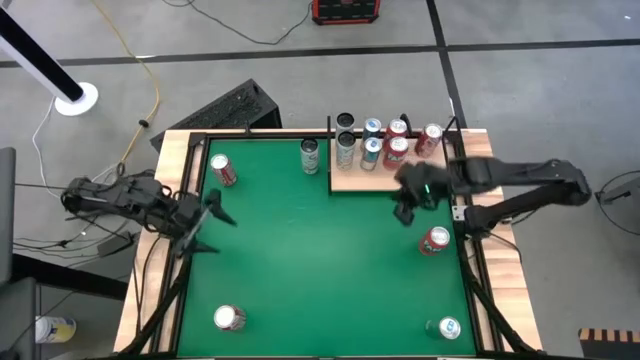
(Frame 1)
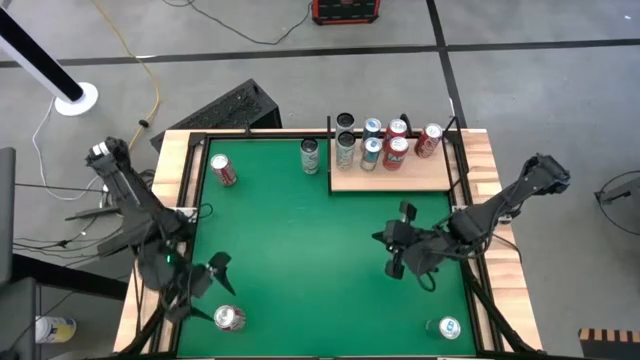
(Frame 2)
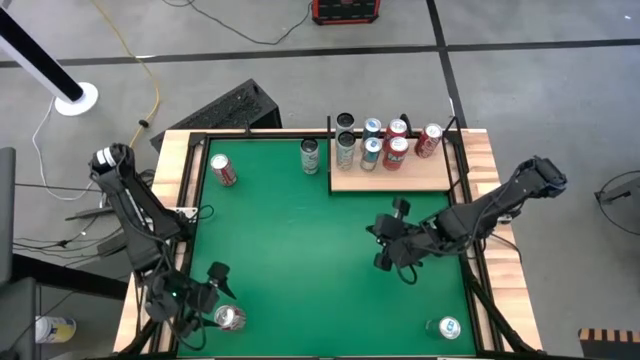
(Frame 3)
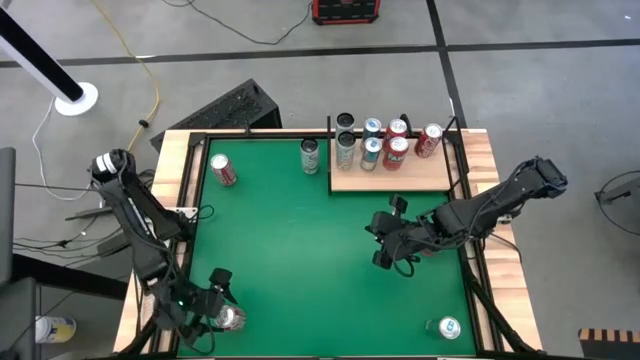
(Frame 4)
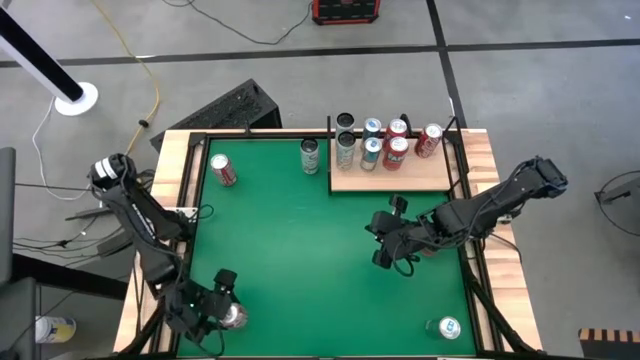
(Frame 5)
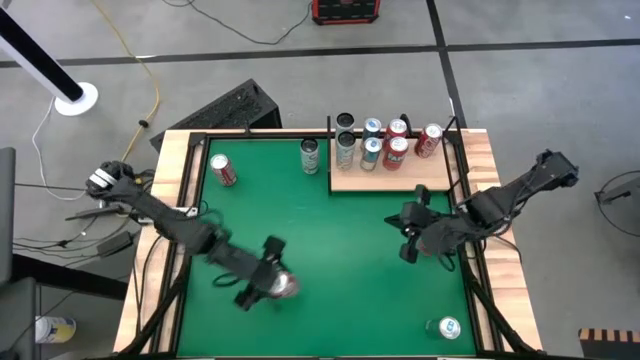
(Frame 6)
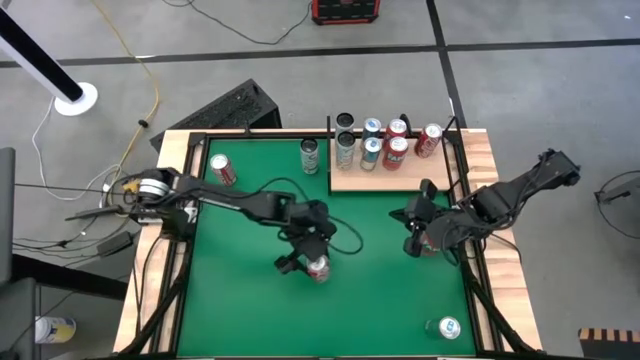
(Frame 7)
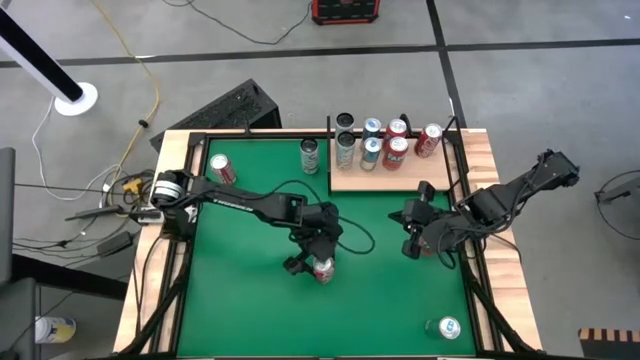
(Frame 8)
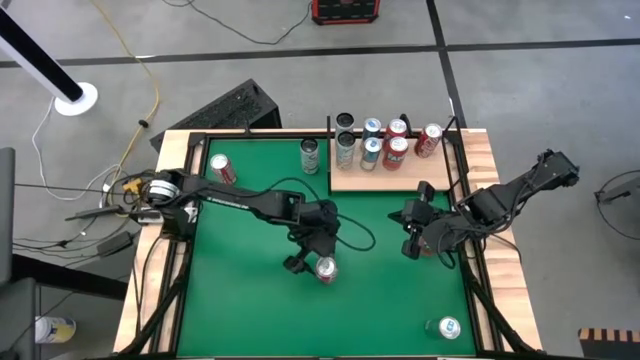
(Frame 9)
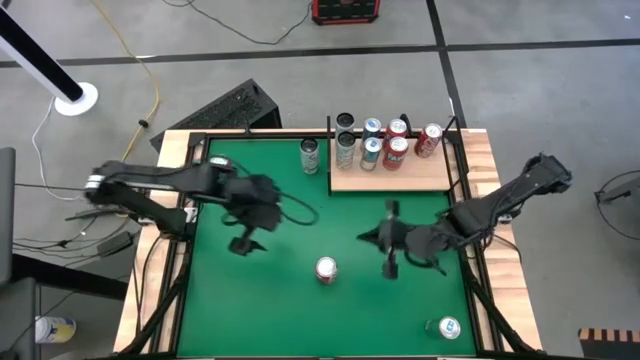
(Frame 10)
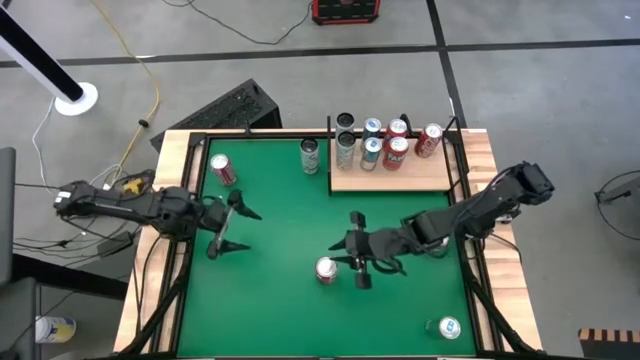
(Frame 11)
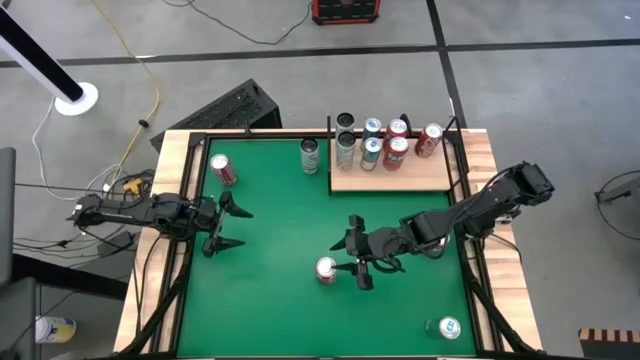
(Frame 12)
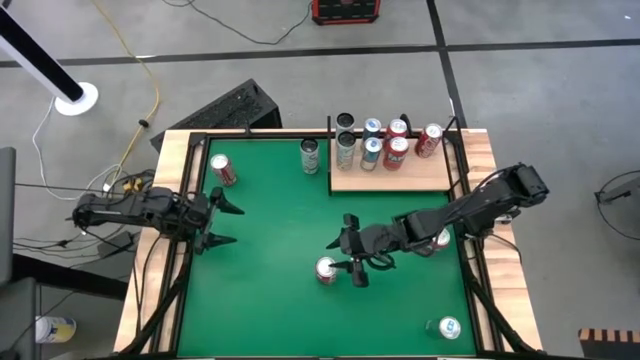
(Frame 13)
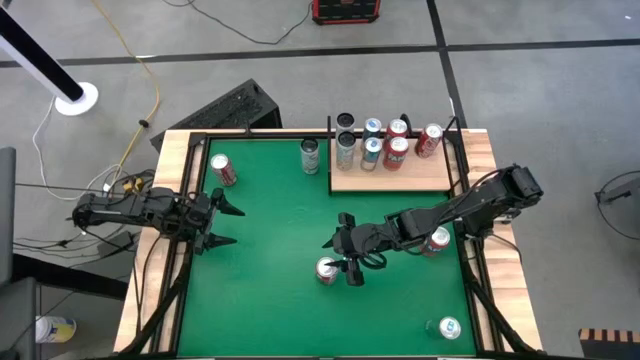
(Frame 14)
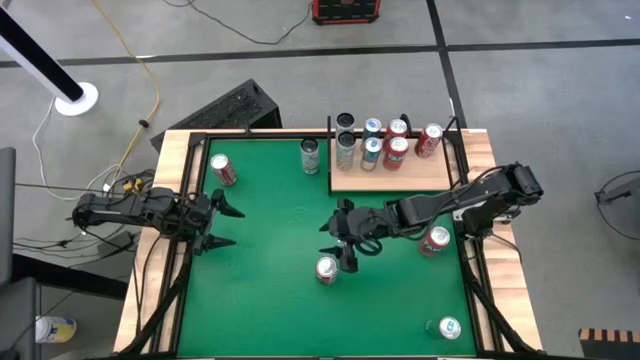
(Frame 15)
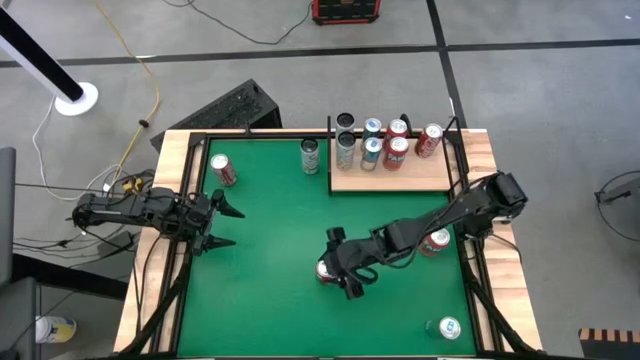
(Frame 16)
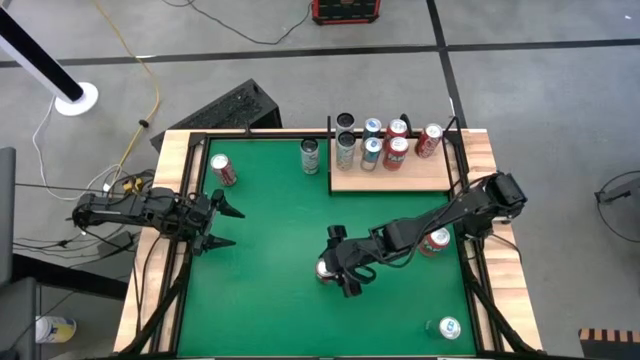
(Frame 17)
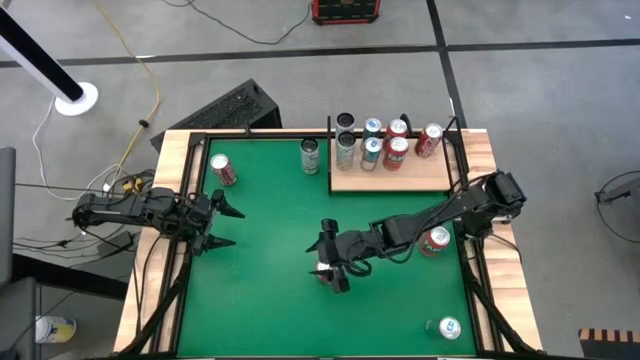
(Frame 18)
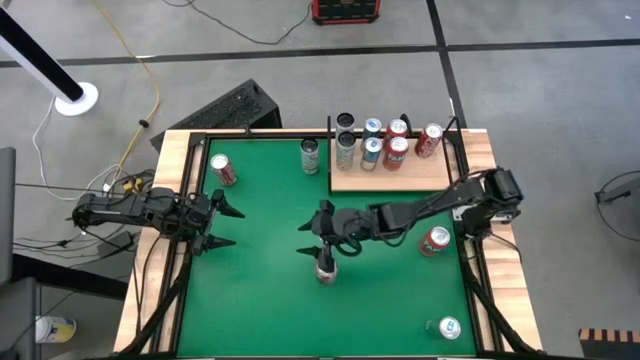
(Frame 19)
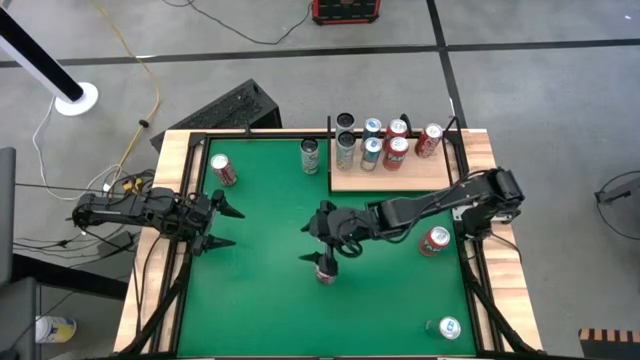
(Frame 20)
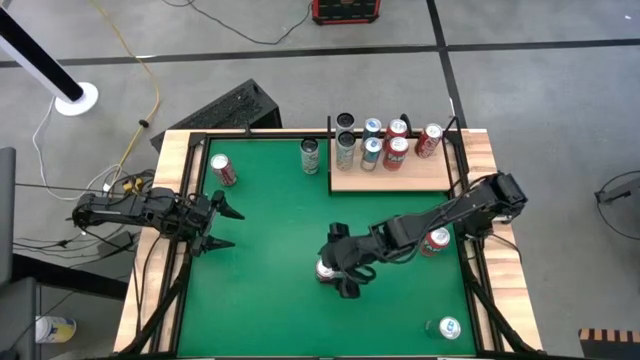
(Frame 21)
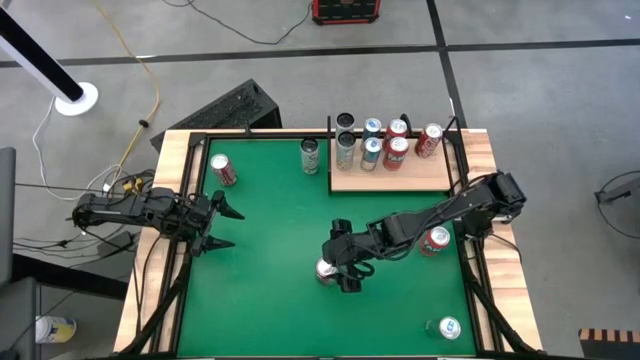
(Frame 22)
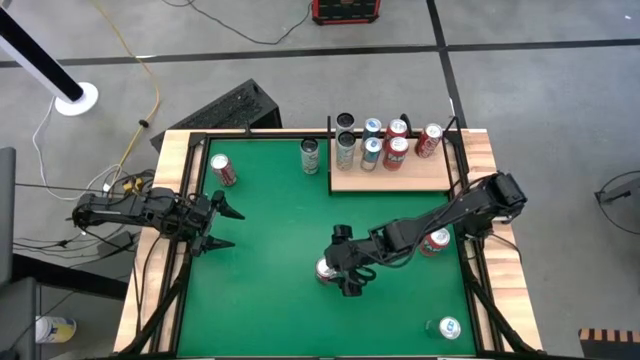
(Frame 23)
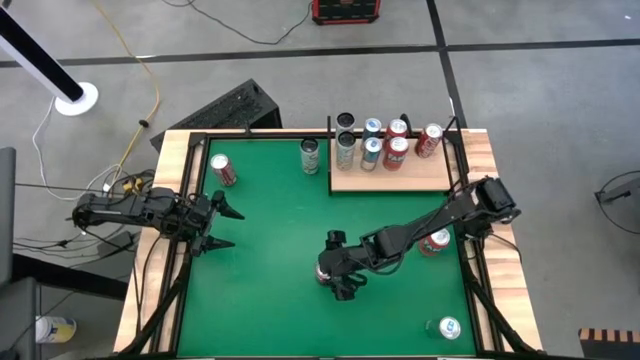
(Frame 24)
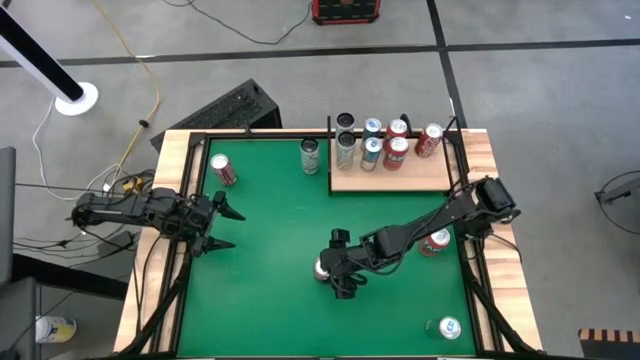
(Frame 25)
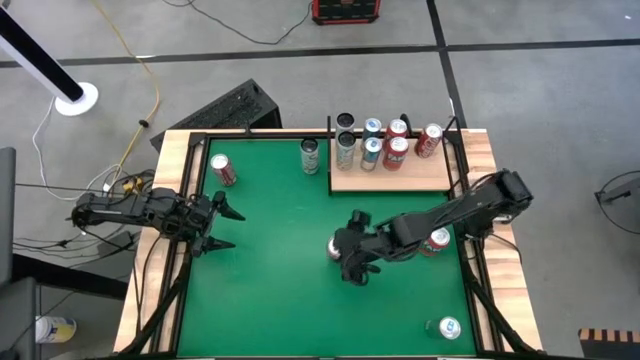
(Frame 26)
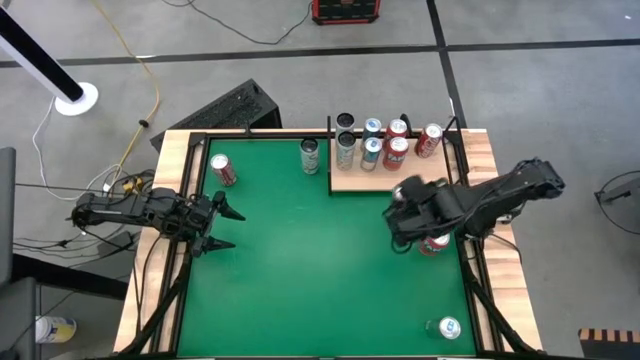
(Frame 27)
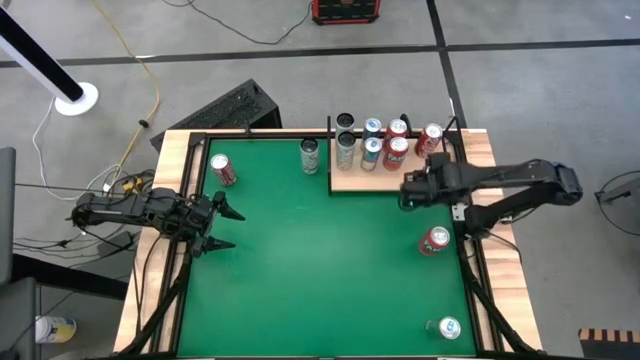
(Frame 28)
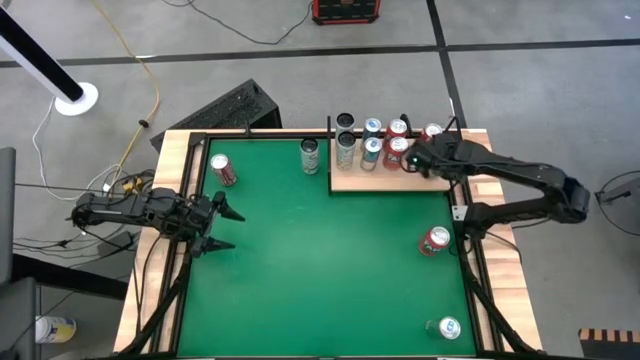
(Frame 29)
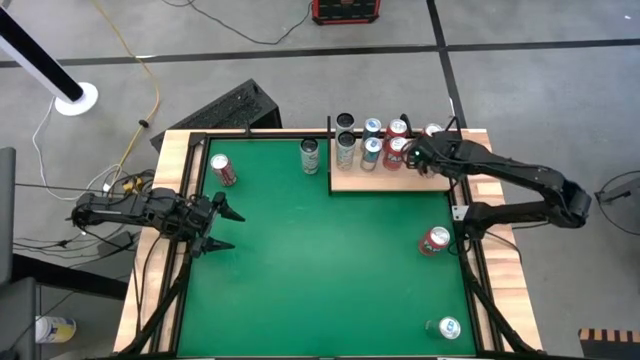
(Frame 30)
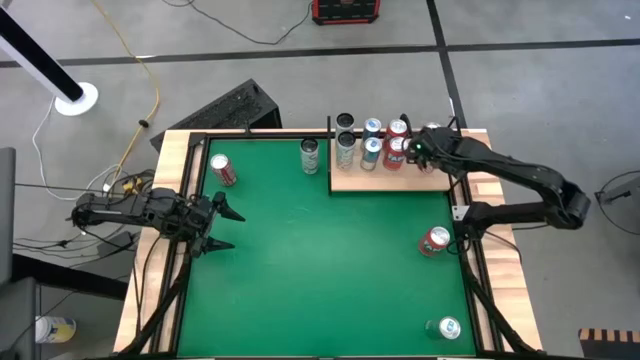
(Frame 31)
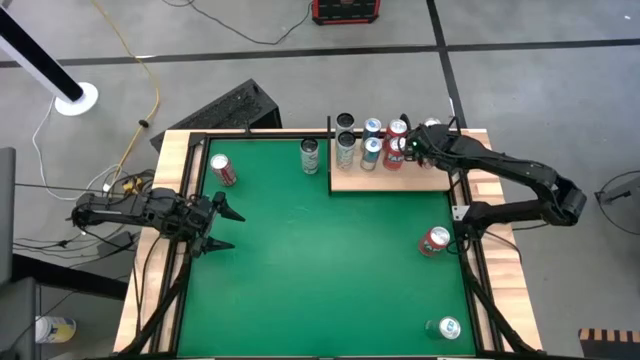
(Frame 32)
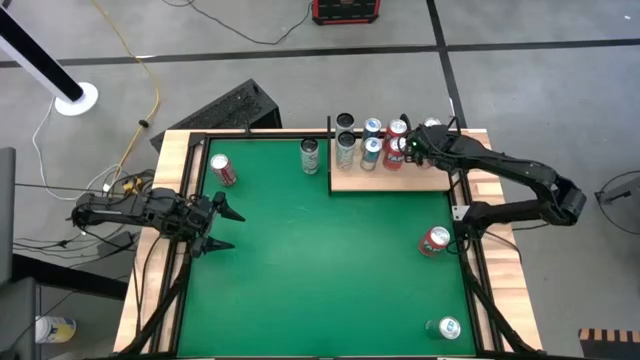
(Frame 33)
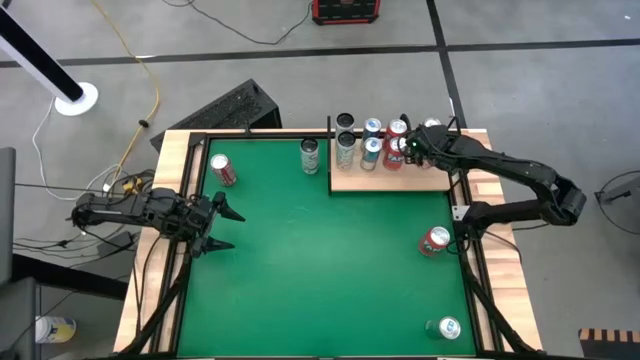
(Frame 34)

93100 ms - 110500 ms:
Task: Sort soda cans
Put the bottom red soda can on the shelf align with the other red soda can
